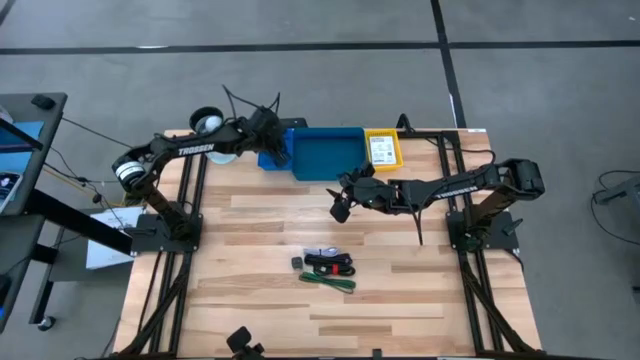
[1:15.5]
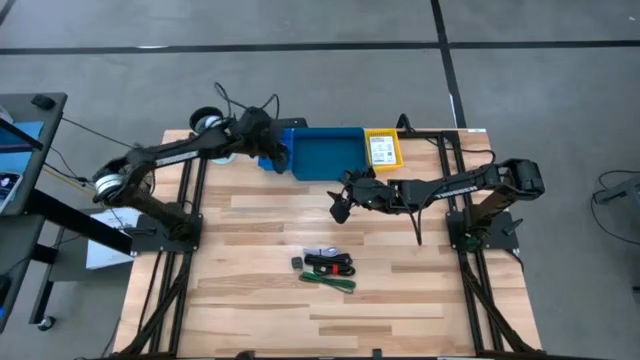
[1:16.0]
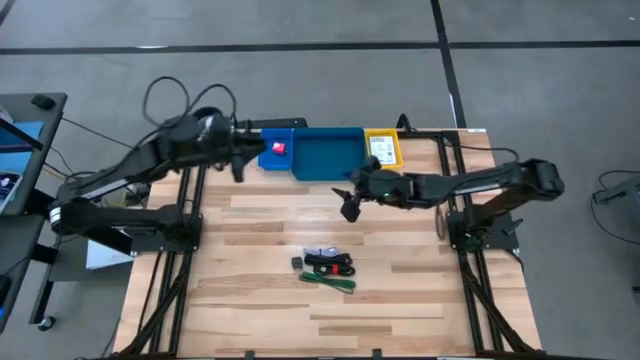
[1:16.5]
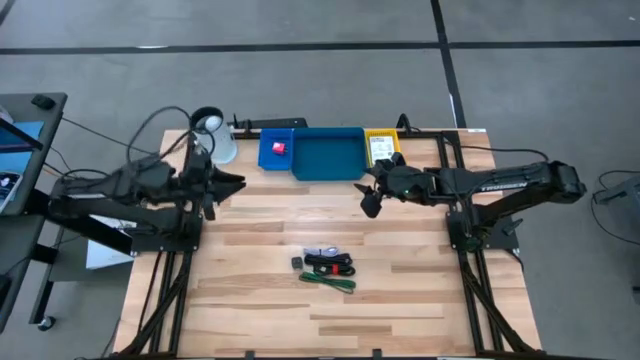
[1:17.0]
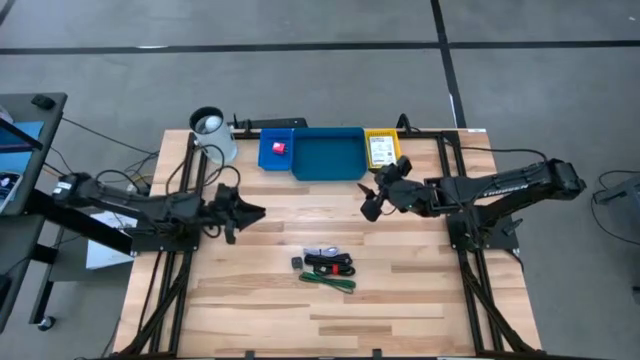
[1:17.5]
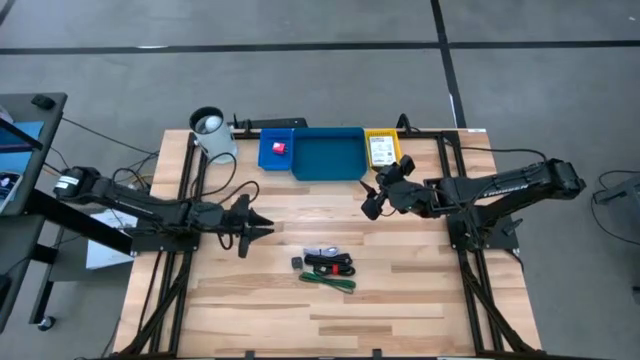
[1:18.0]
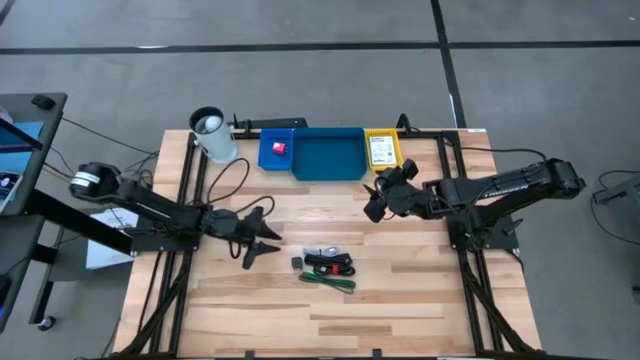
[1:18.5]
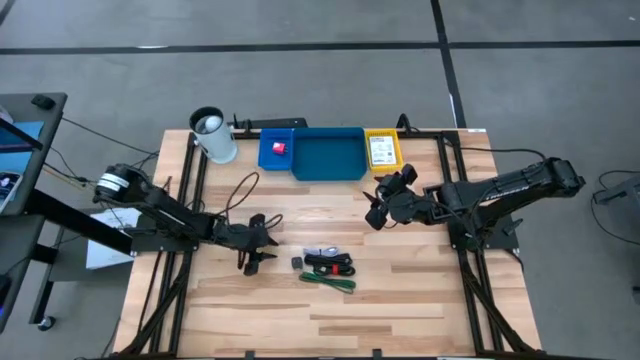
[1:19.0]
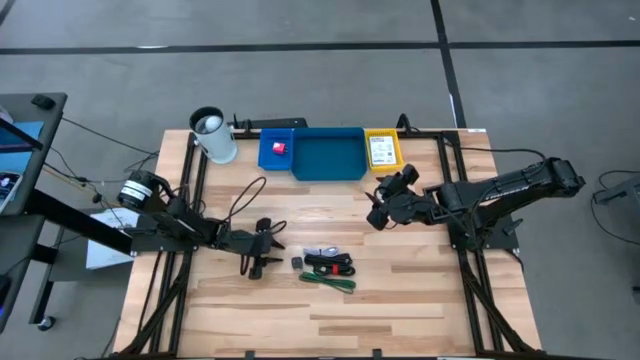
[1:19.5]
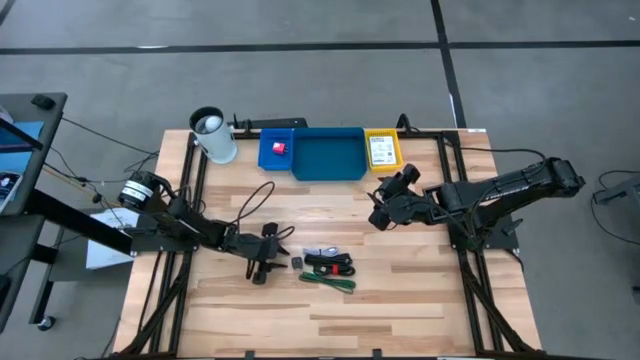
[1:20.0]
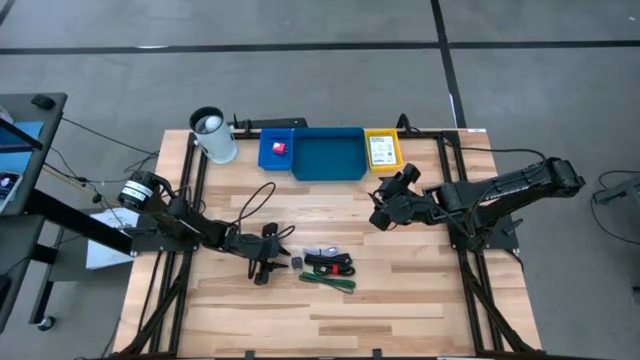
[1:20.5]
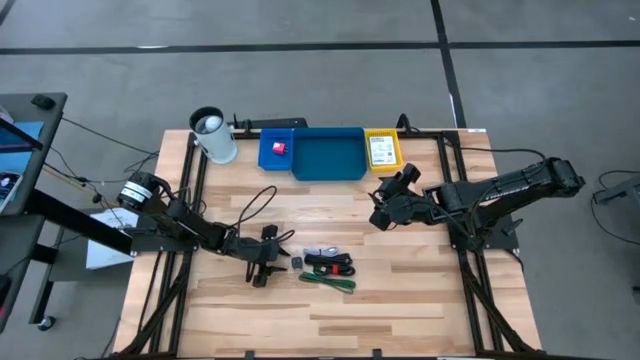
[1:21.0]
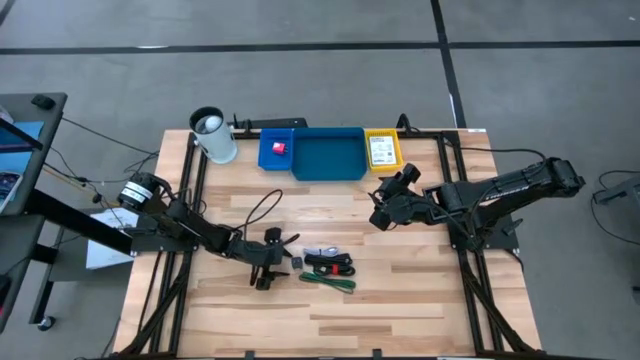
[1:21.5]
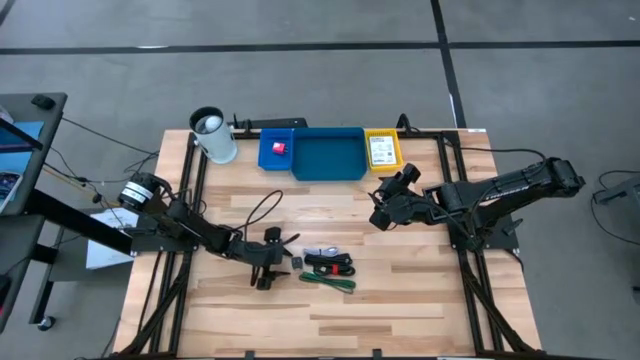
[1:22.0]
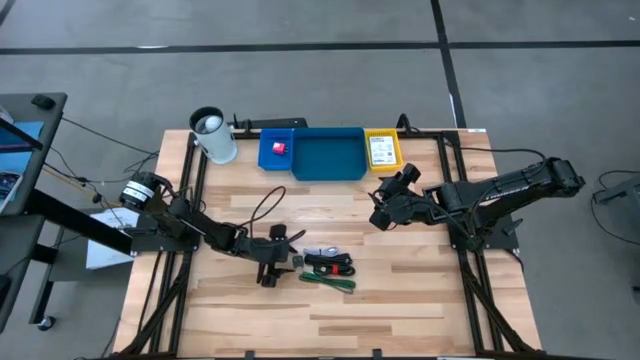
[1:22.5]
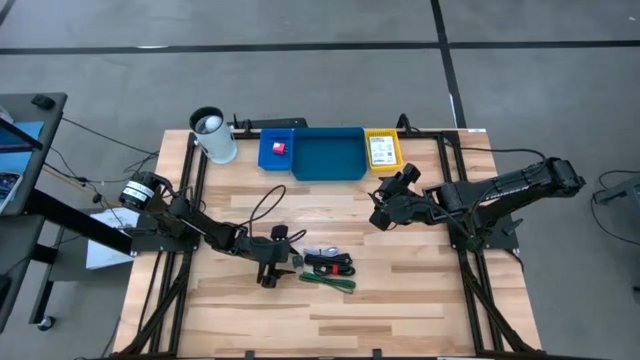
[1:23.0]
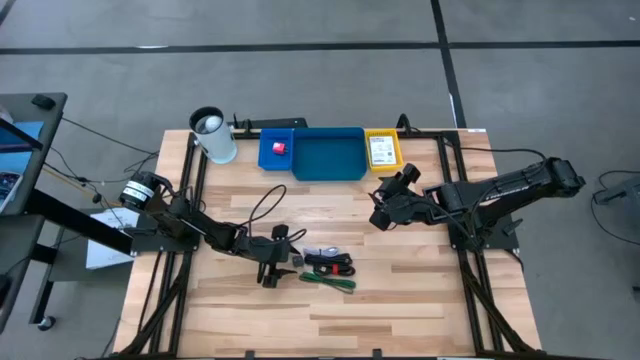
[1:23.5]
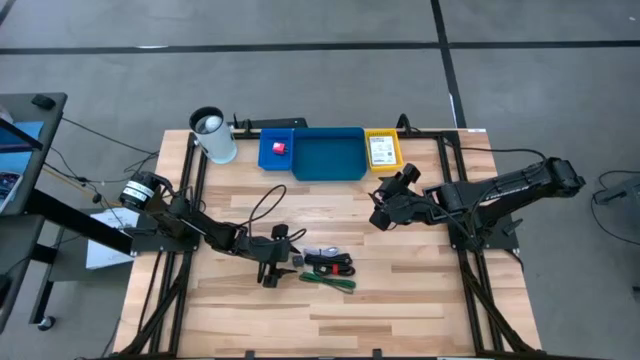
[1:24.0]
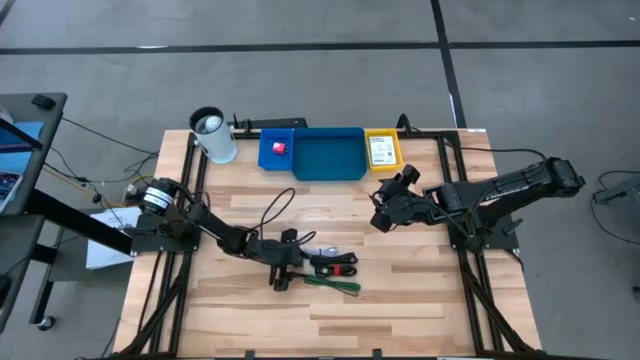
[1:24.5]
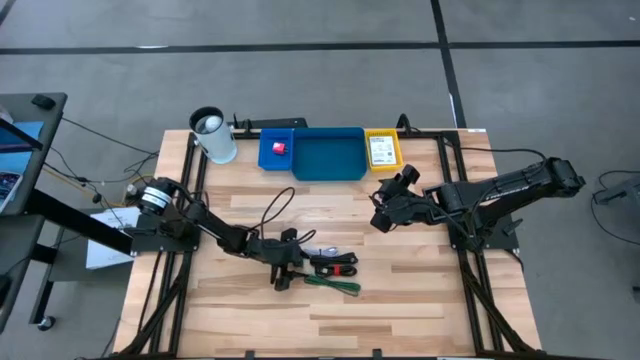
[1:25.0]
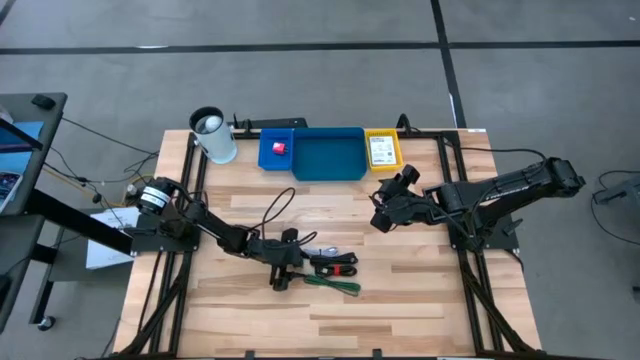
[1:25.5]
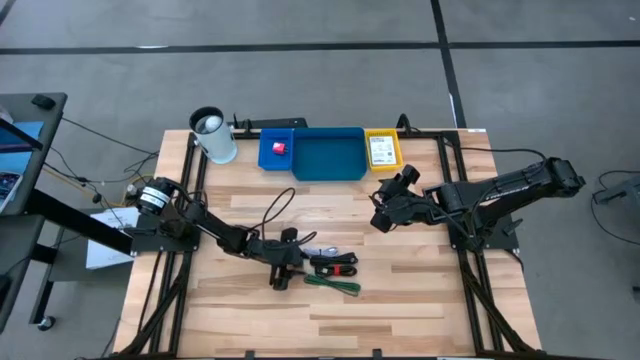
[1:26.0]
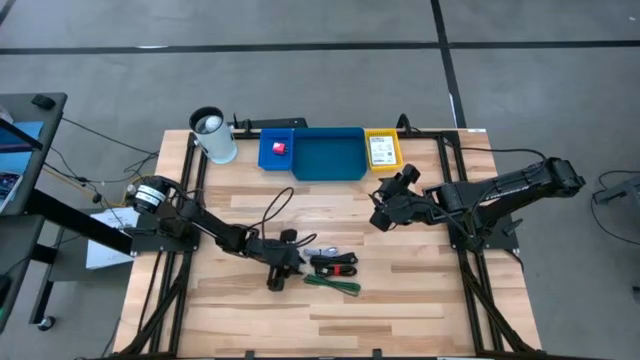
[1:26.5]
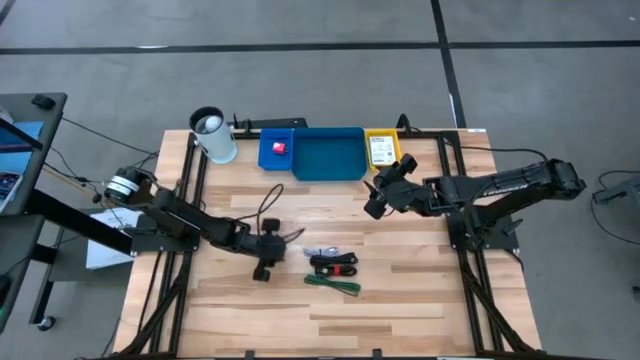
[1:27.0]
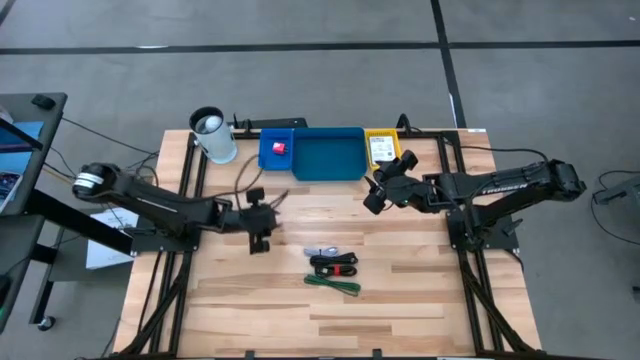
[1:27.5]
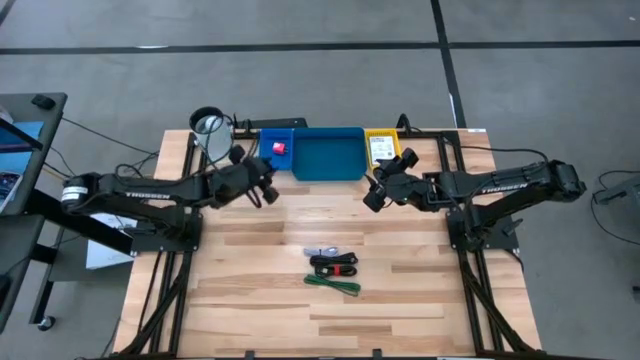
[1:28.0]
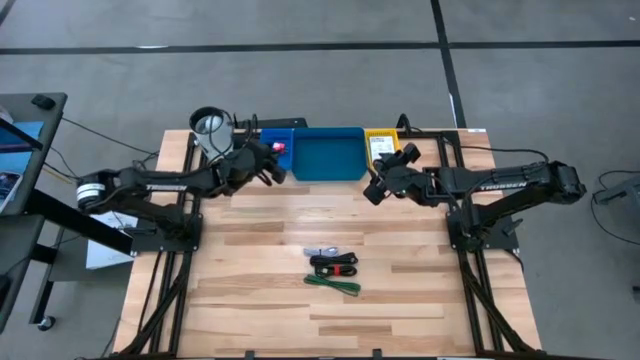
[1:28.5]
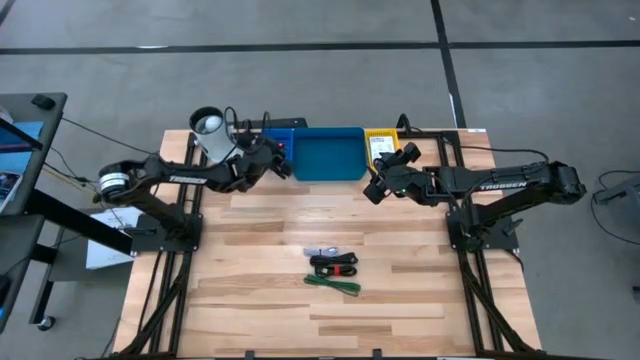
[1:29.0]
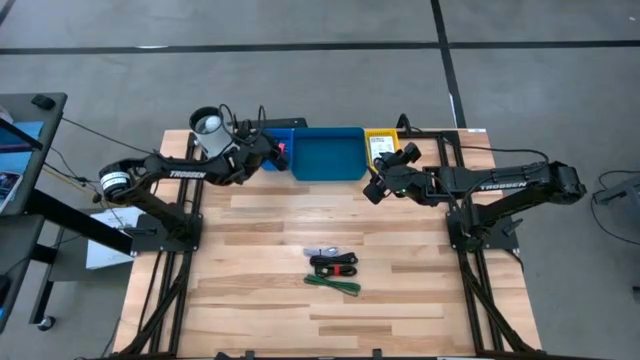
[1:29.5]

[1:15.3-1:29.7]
Task: Pick and place items into bin
Put the black charger adapter into the blue bin

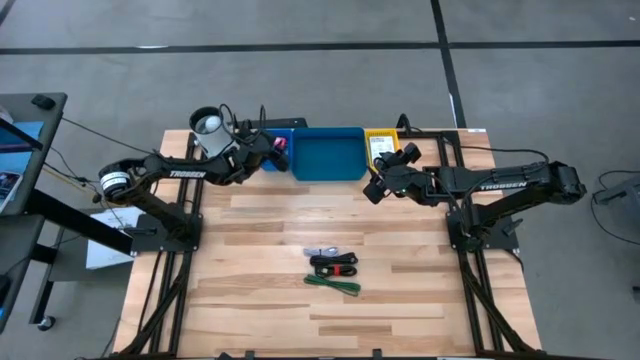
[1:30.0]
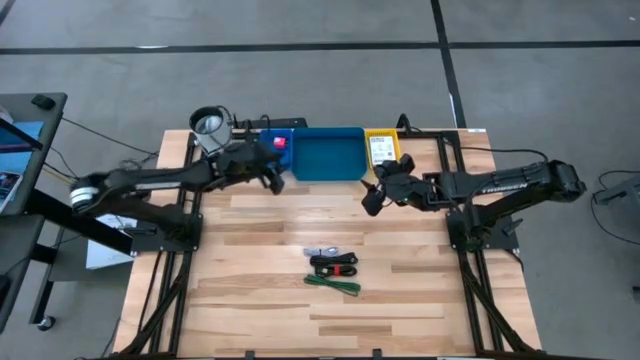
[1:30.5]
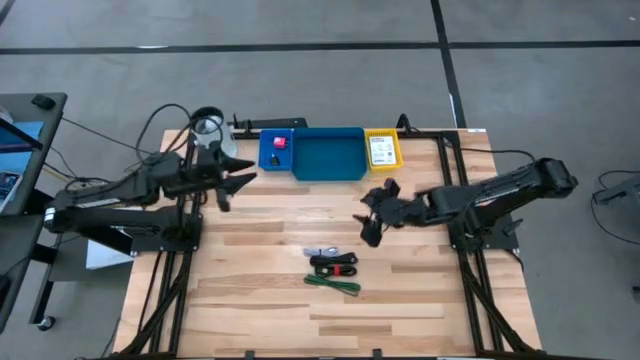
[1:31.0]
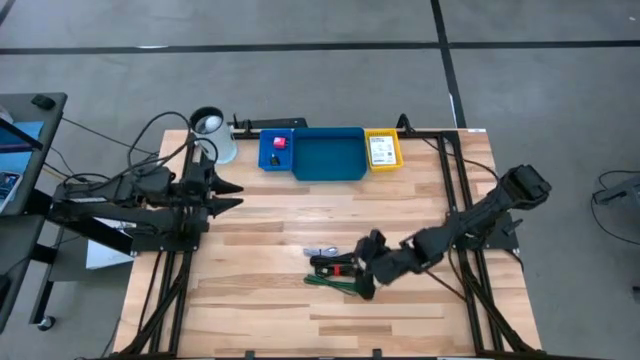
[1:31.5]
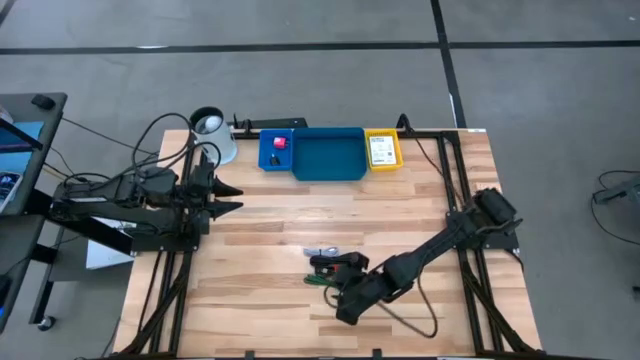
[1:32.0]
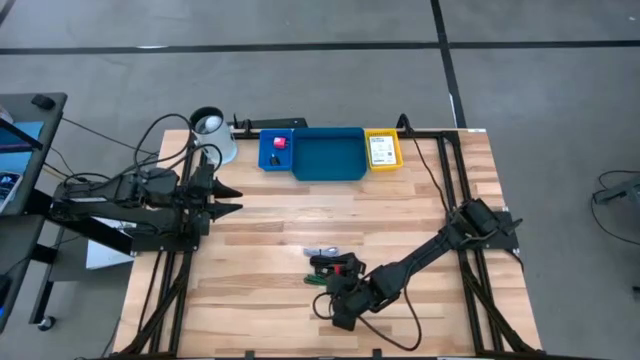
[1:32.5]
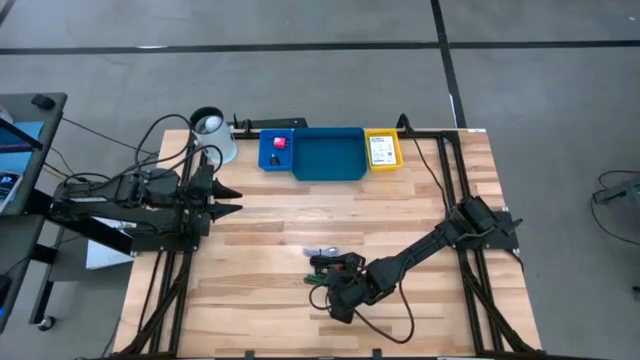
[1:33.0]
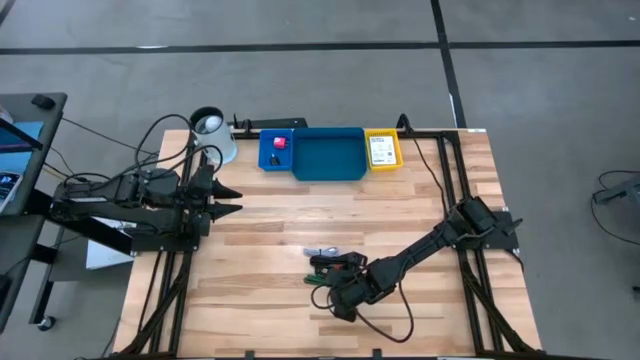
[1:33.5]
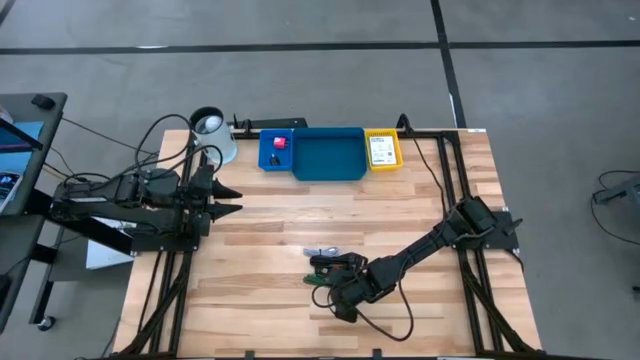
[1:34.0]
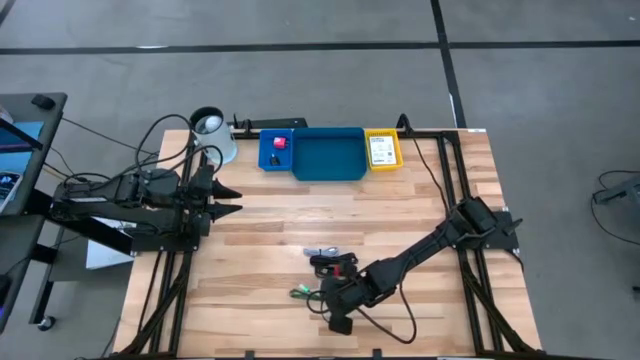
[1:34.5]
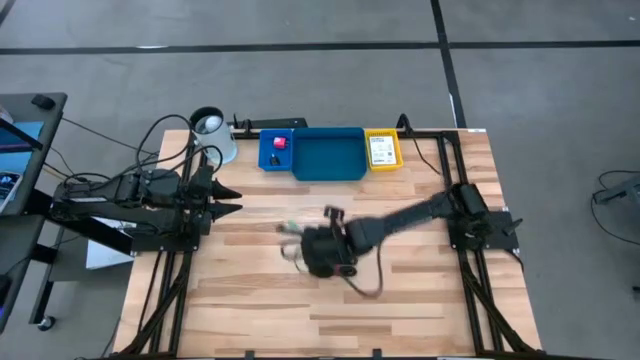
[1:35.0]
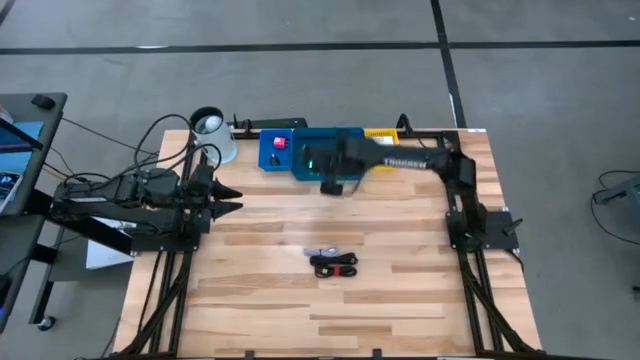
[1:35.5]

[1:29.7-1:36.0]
Put the green charger cable into the dark blue bin

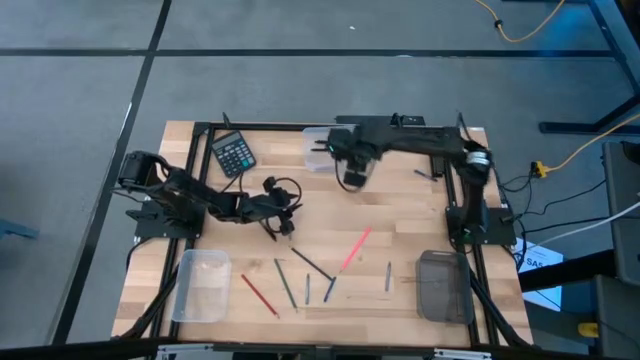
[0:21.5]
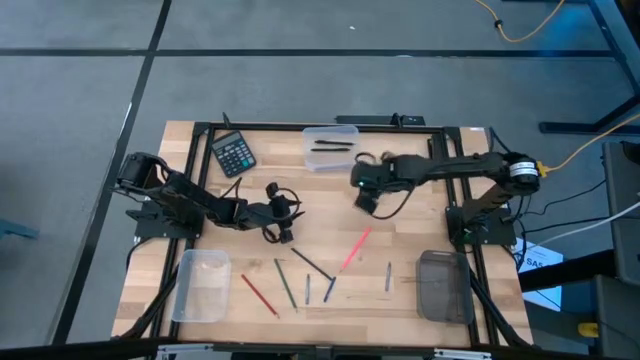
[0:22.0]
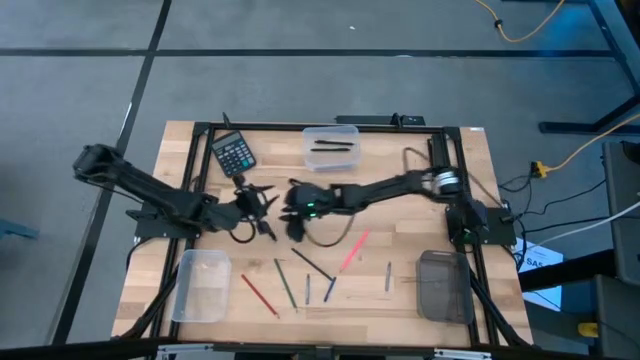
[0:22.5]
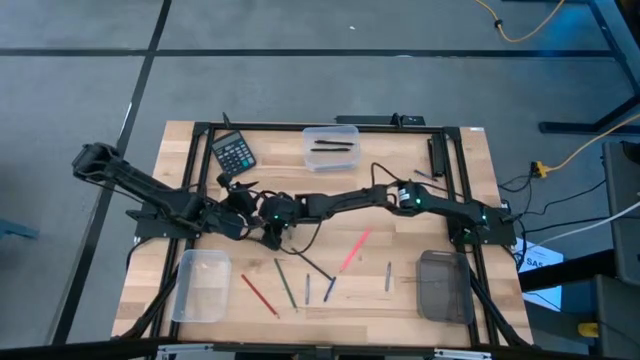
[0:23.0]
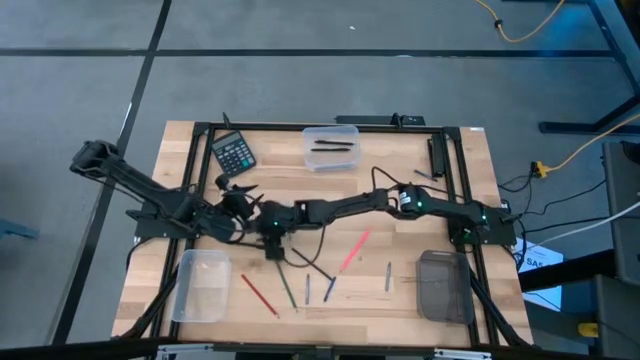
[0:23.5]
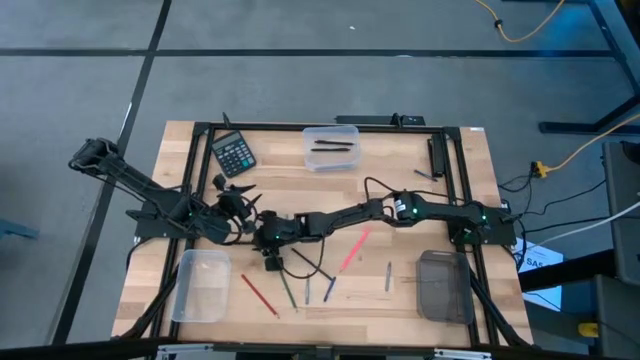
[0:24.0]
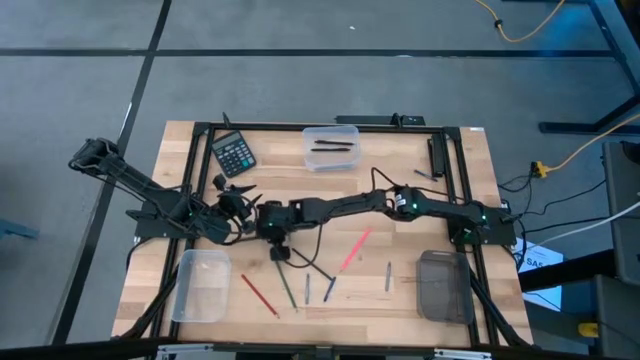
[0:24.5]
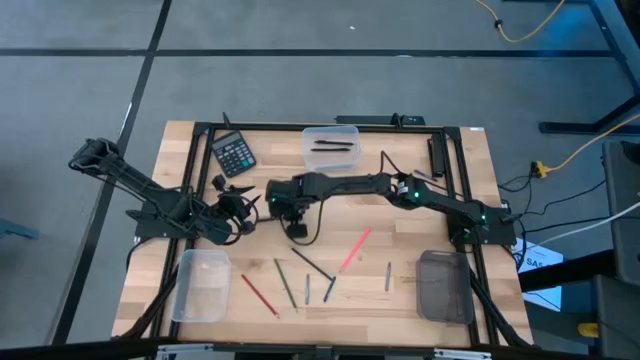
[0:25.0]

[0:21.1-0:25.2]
Task: Sort crayons/erasers/pens/pencils in bins
Put the black pen into the top transparent bin
